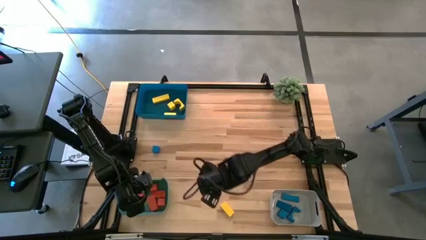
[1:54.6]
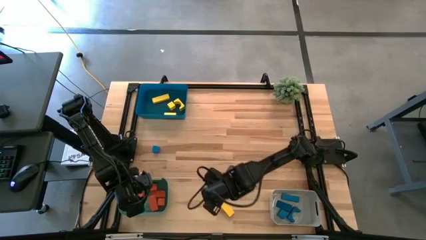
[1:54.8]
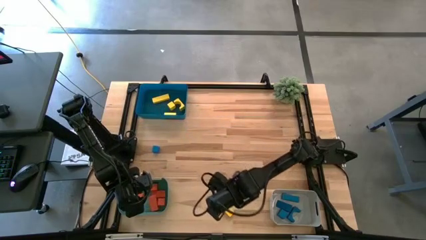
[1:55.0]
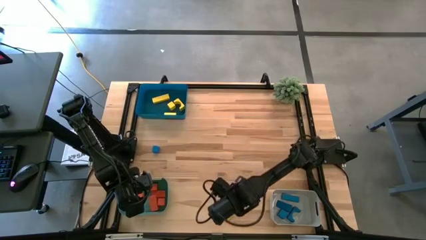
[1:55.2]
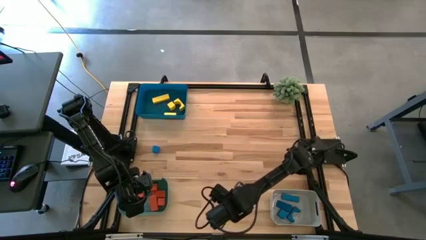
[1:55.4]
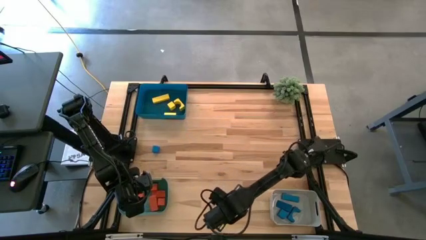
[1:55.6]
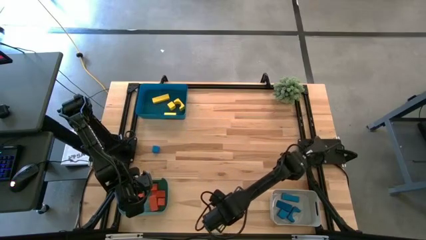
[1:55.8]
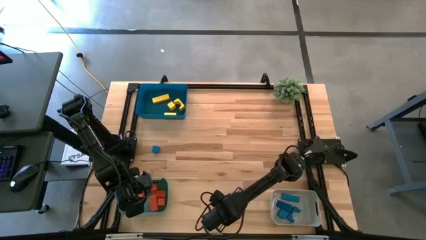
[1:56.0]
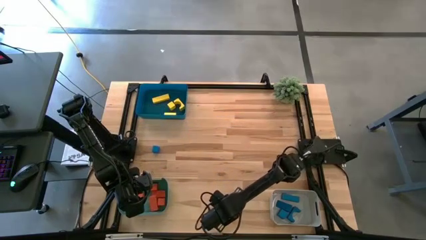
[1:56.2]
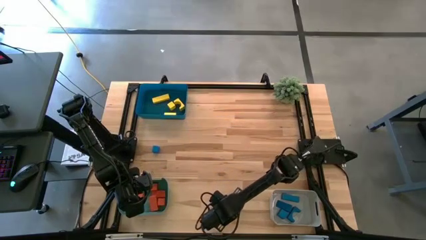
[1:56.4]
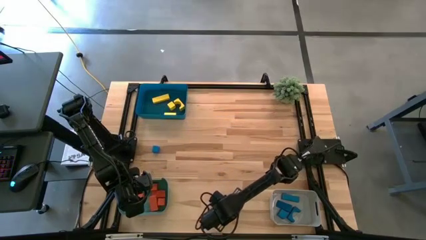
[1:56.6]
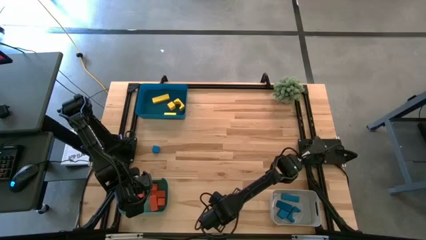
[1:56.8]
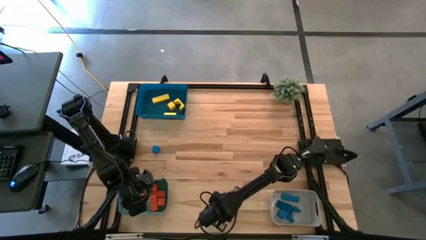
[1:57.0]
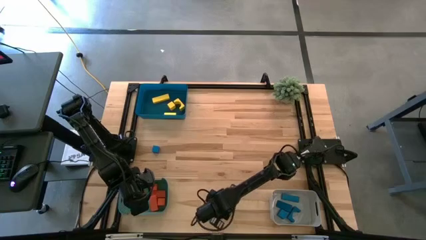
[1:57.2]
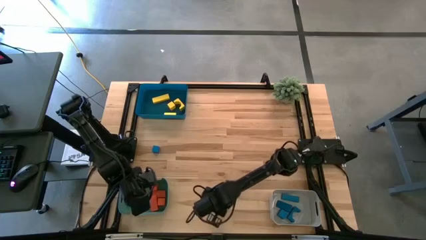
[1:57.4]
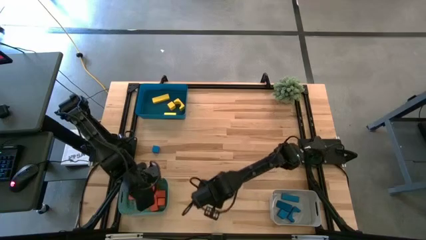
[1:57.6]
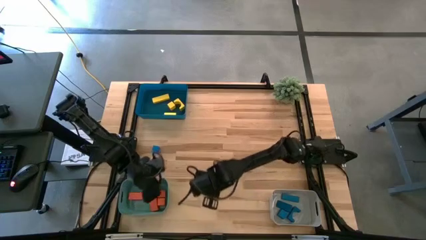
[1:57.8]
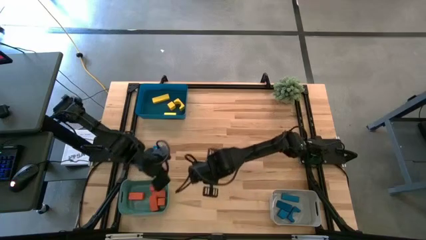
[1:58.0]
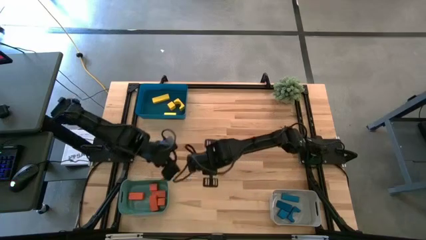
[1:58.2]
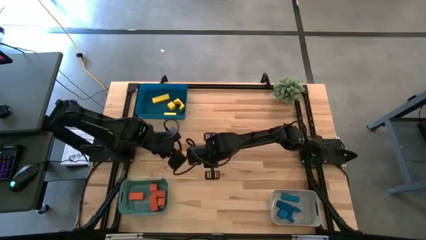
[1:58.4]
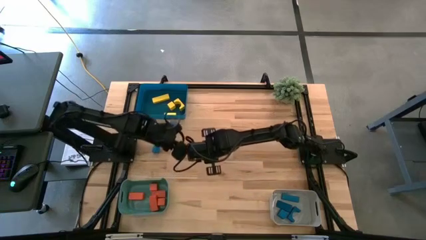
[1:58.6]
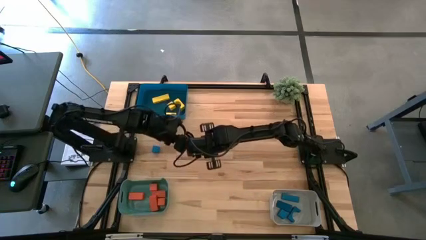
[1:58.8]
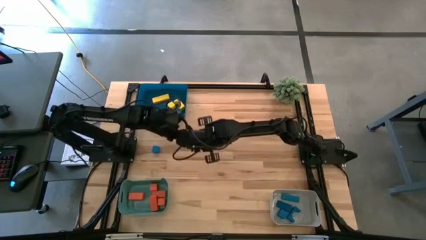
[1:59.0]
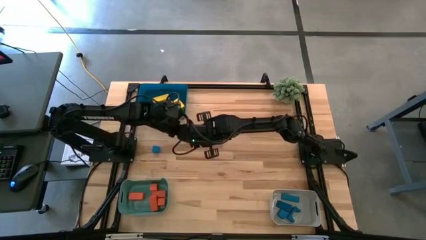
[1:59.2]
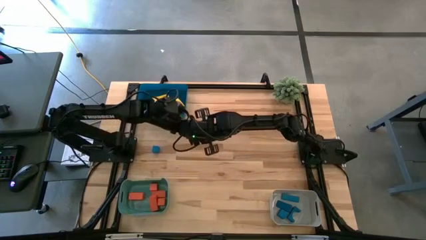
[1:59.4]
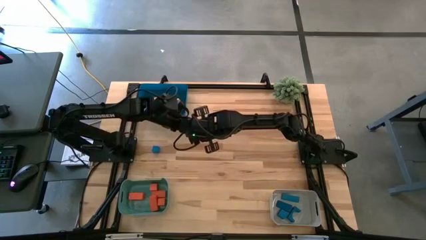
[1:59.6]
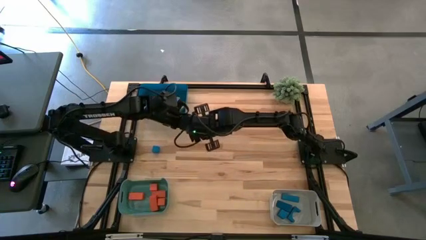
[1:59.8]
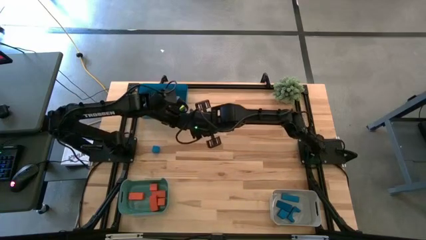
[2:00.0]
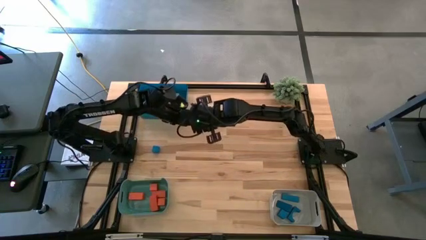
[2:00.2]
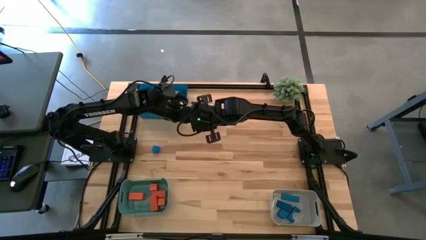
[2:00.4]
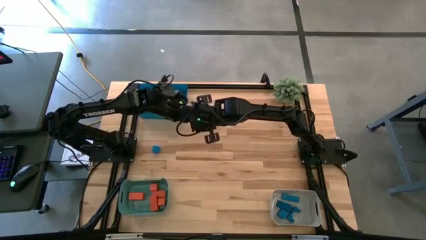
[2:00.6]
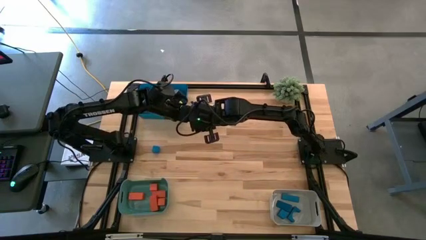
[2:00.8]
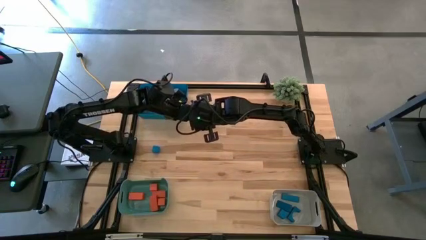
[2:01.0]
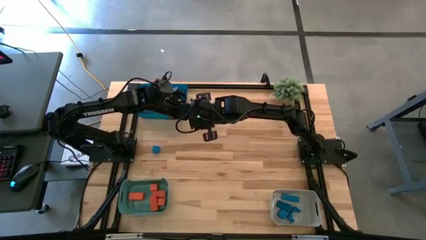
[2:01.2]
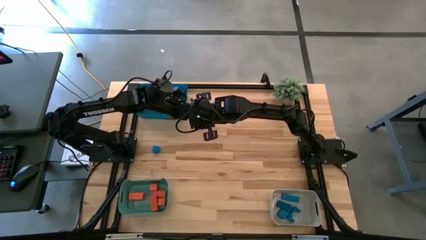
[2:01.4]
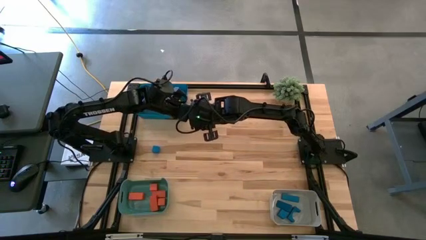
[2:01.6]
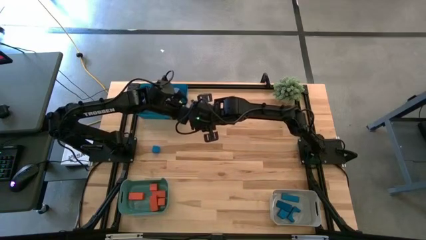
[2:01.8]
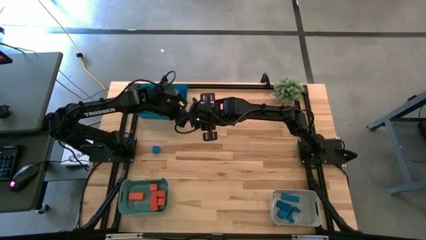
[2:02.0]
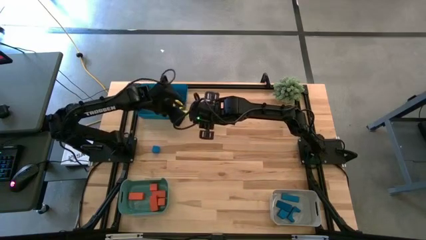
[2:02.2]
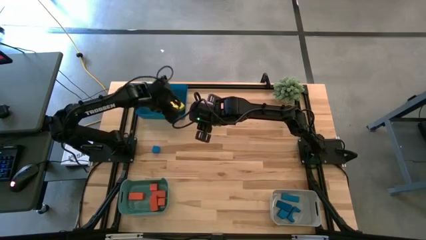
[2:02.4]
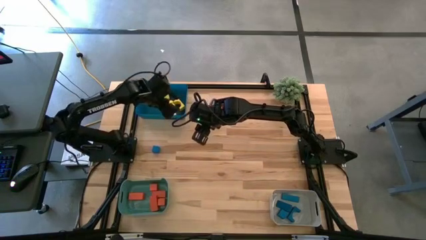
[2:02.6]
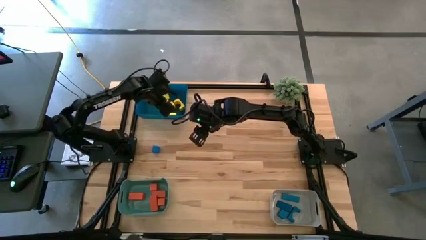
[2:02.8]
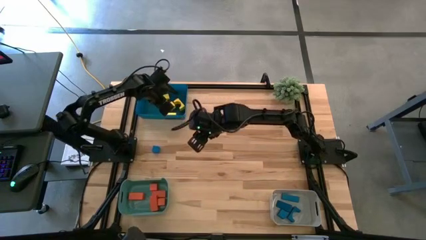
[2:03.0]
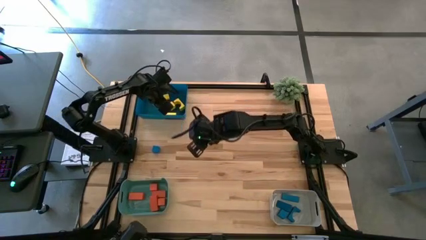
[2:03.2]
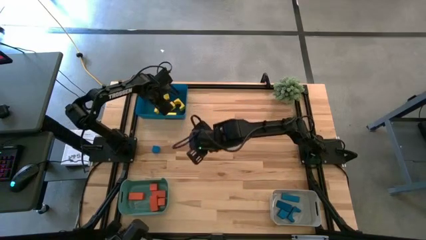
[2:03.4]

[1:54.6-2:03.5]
Task: Sort & place blocks by color
Put the yellow block into the dark blue bin

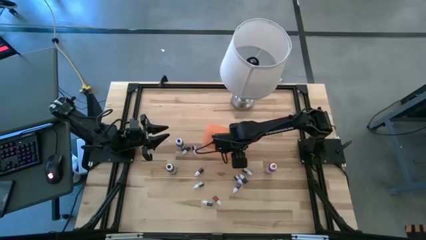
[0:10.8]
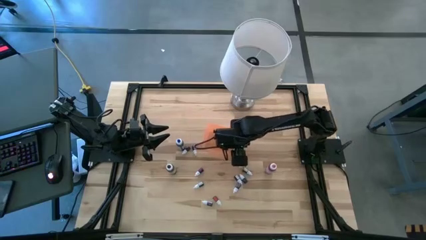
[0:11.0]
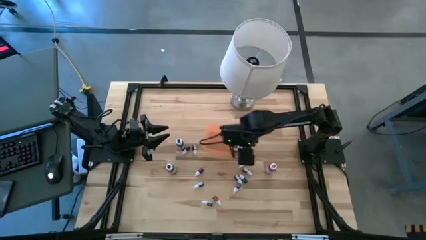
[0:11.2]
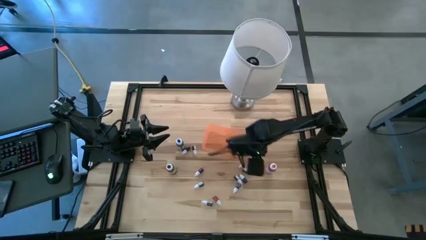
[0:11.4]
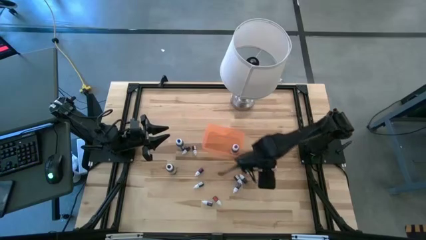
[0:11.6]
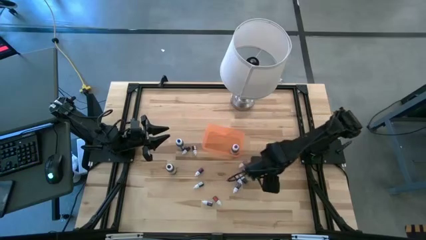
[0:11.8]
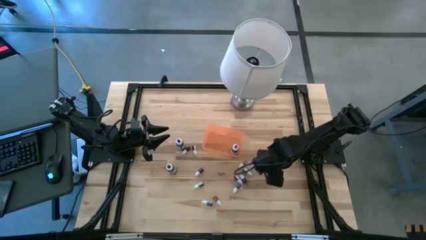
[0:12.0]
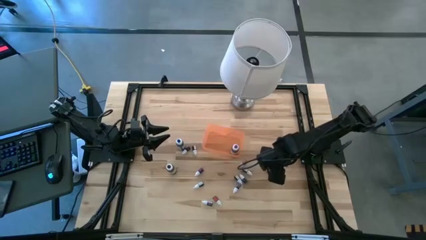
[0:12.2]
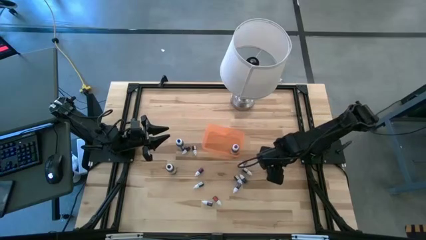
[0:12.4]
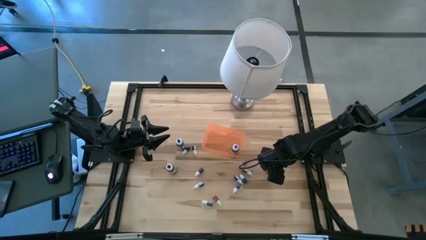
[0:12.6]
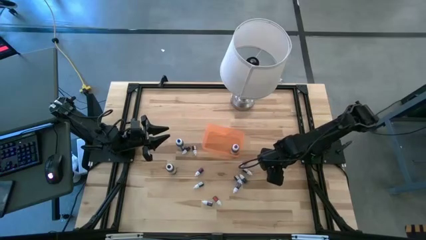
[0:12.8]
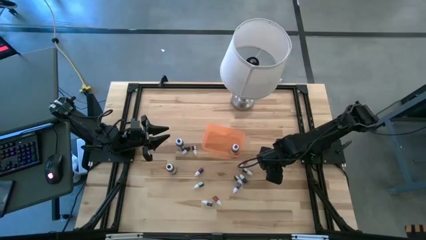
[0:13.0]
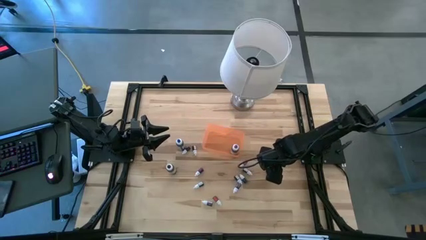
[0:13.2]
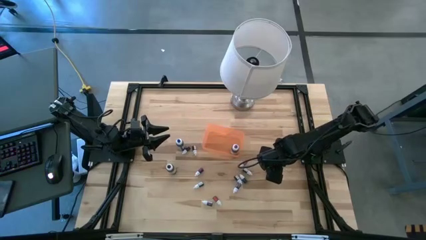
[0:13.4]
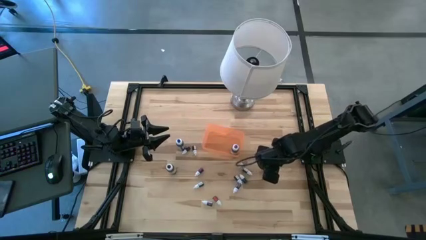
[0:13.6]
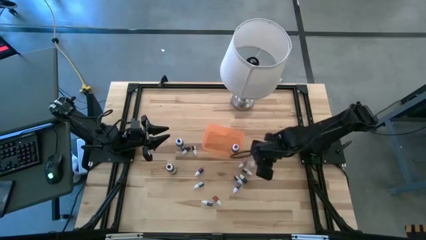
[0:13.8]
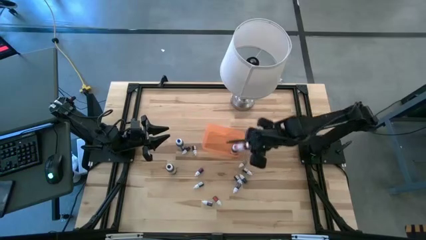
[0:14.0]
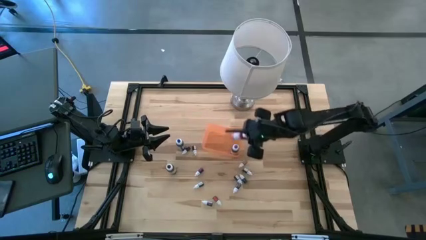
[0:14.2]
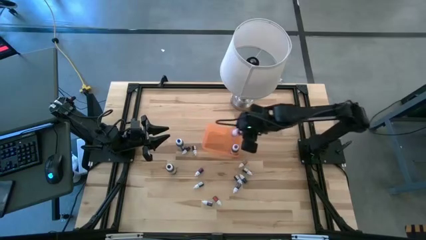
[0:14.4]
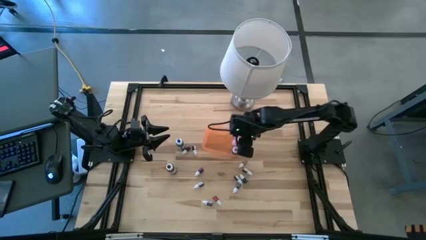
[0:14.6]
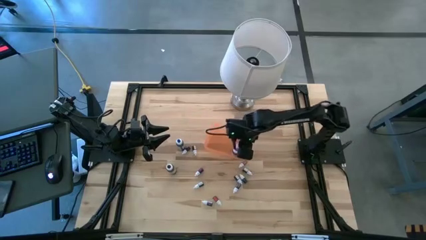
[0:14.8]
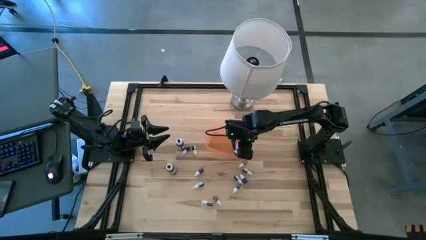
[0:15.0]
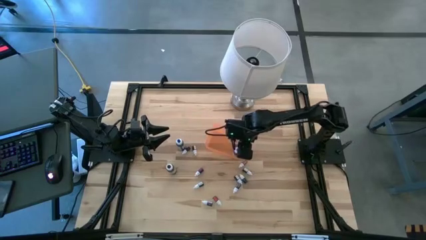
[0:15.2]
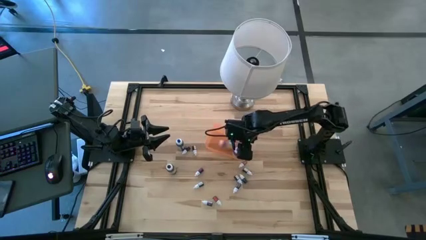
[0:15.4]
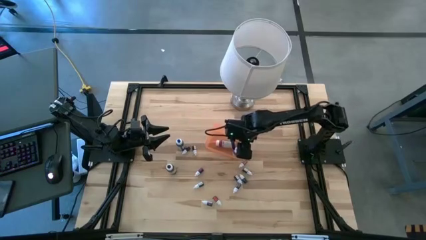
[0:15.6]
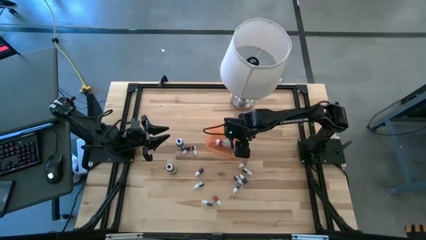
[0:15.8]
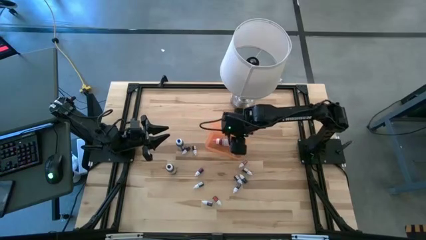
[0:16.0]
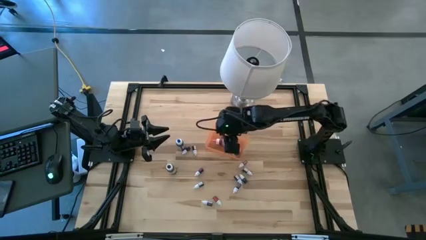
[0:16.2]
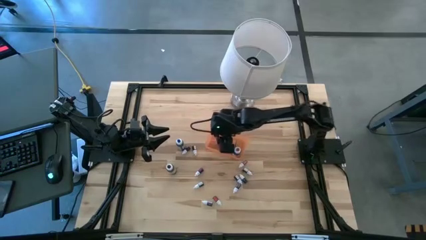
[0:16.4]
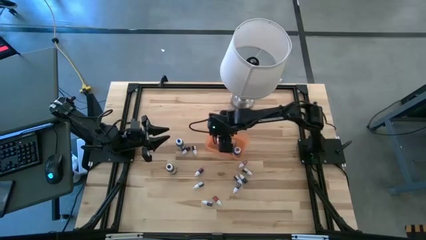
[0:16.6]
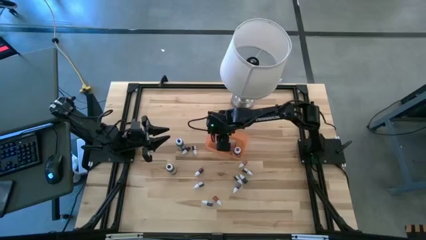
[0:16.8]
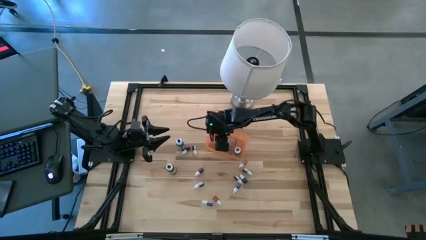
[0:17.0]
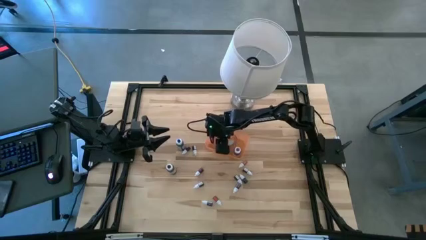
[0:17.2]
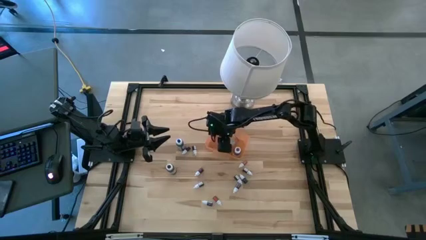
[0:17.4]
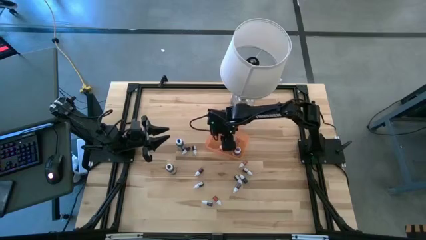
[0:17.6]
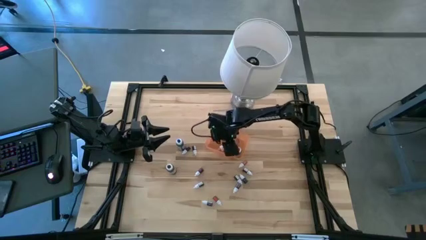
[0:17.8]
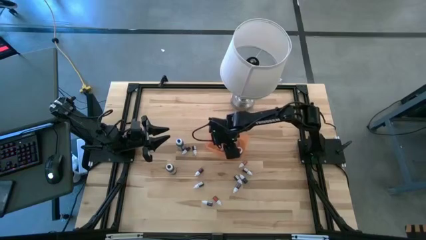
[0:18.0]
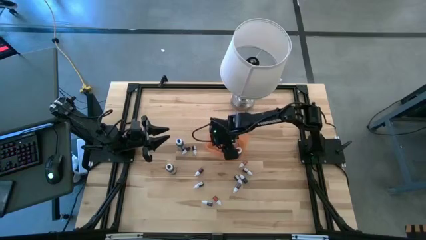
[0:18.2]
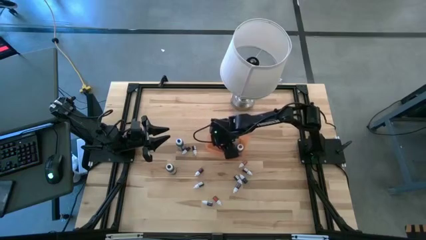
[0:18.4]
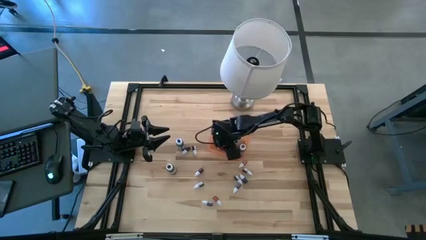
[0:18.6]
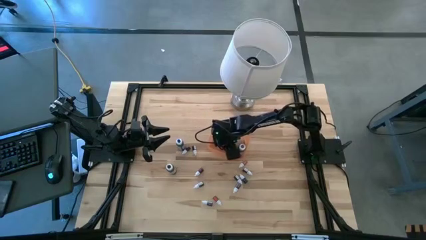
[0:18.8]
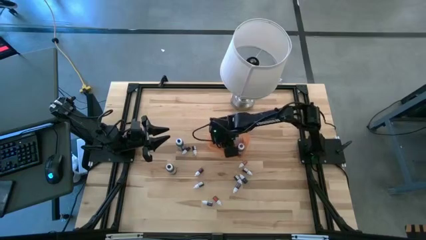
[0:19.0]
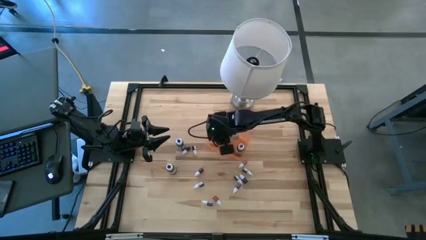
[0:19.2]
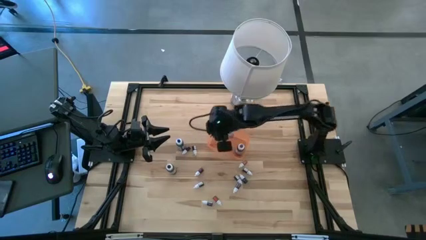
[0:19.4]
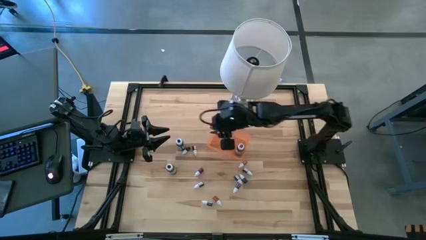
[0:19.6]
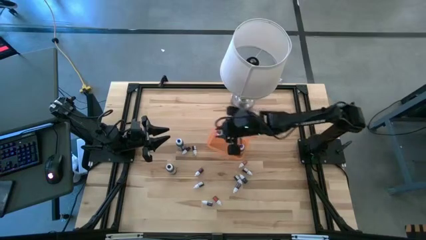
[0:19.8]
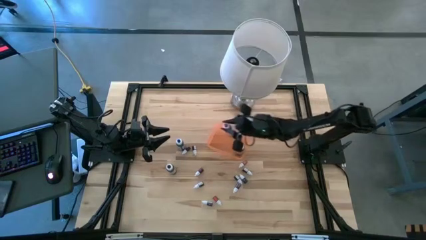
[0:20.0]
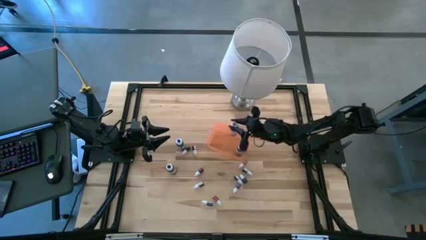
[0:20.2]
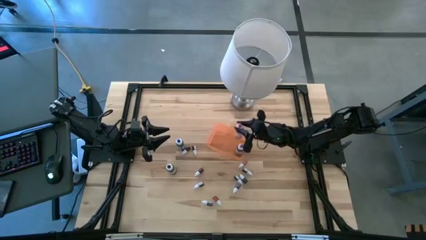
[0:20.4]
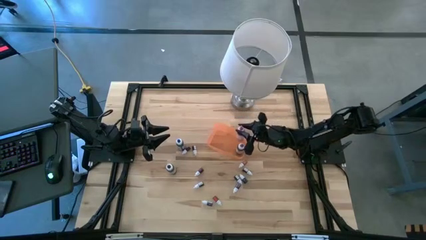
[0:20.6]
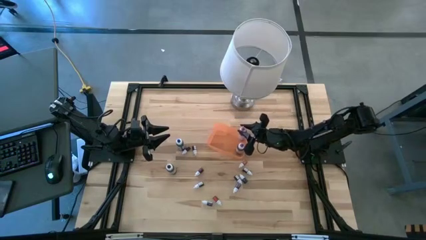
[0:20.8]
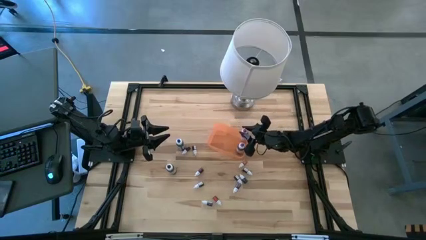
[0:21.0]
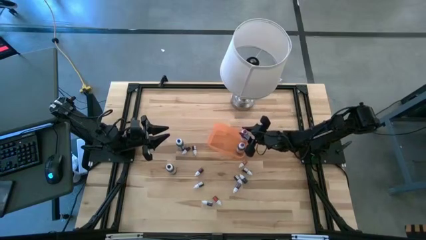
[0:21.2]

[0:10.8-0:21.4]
Task: Pick & Place food coloring
Put the large pink food coloring bottle into the orange bin
